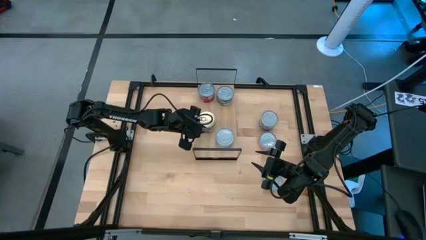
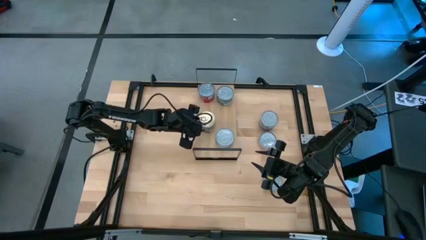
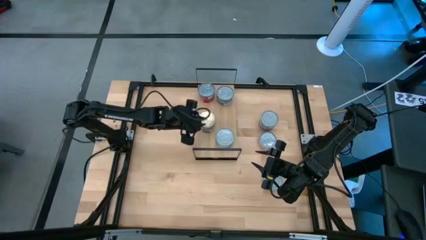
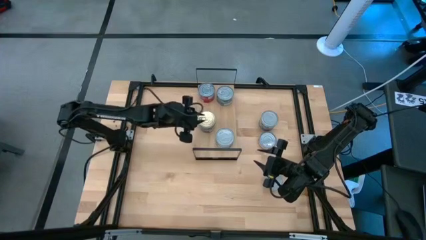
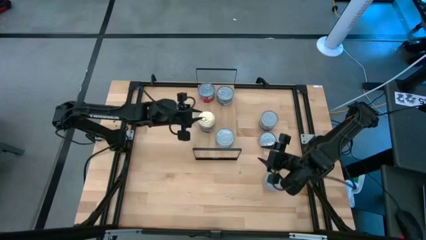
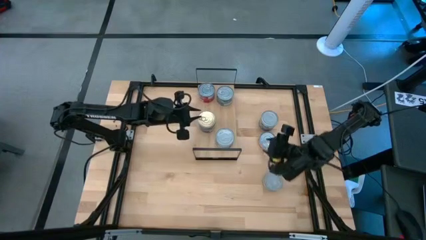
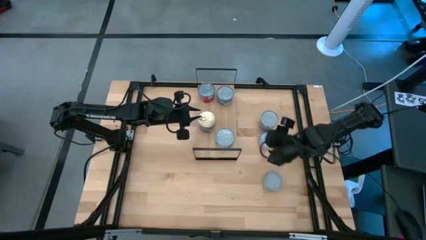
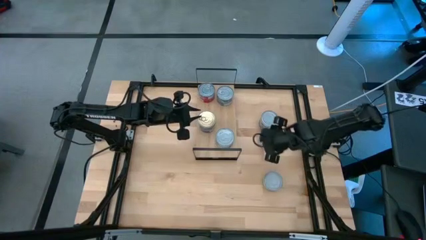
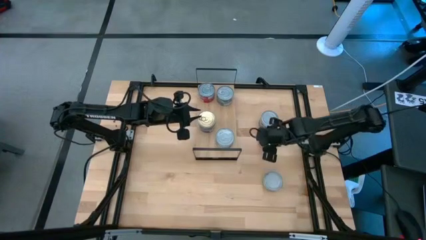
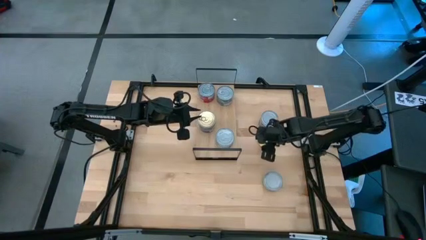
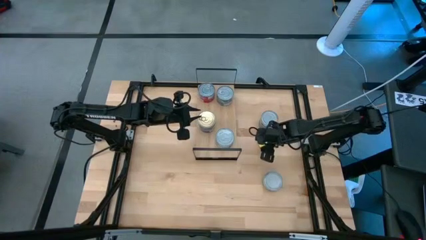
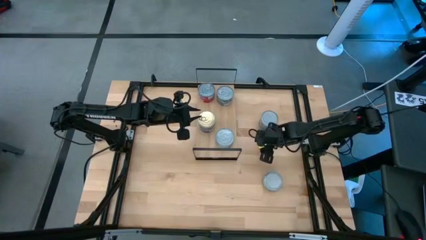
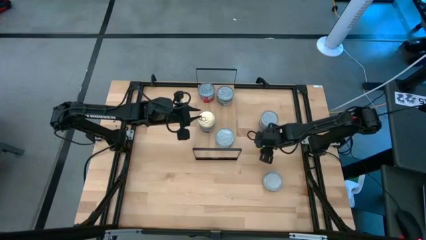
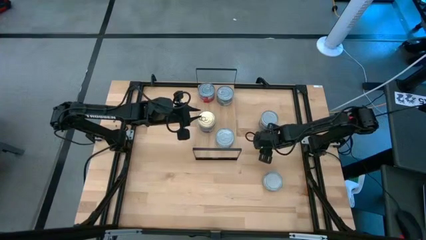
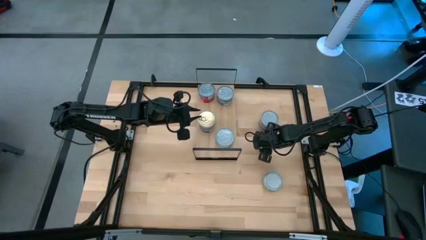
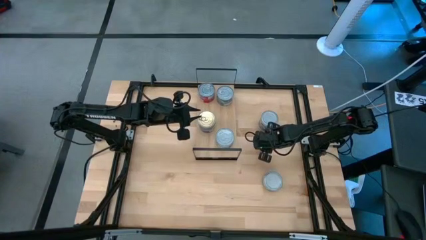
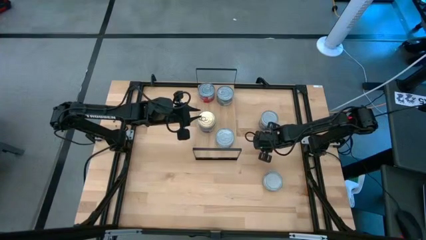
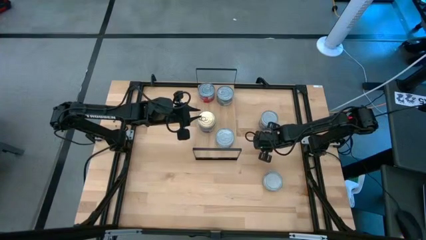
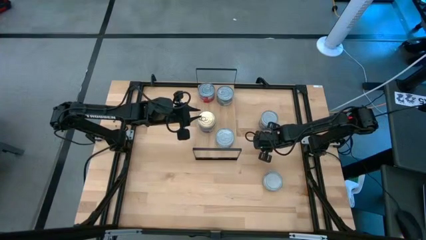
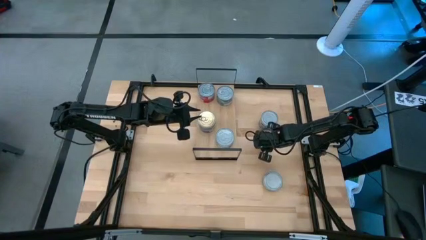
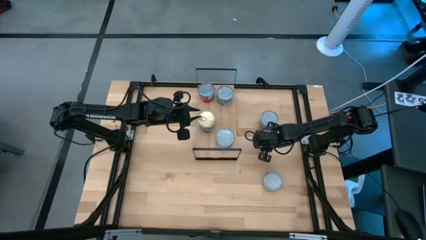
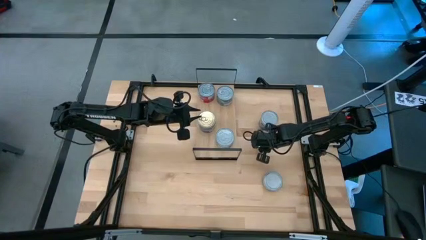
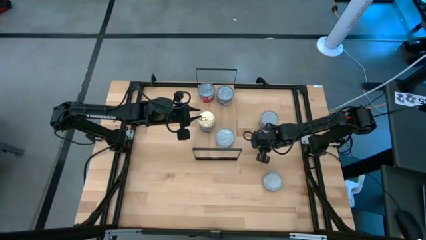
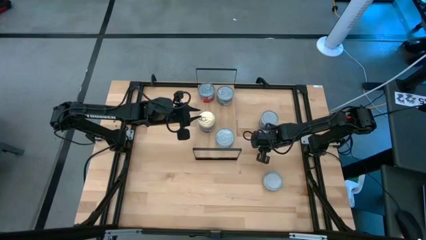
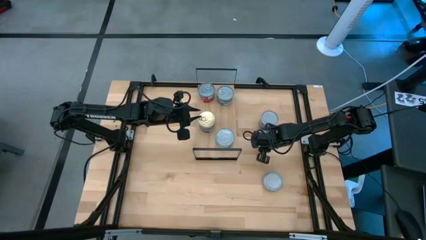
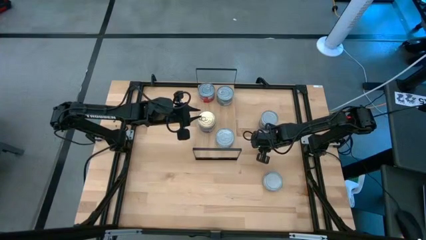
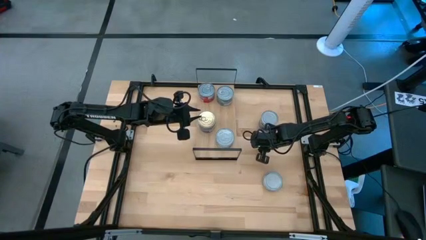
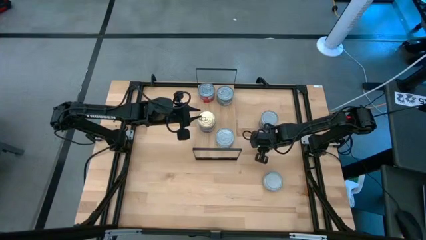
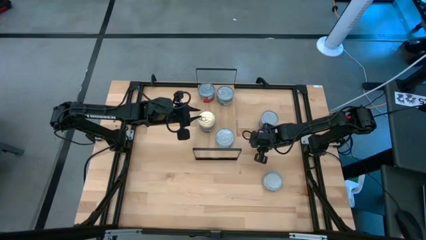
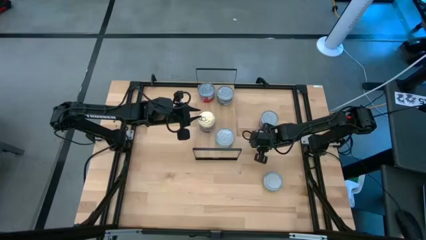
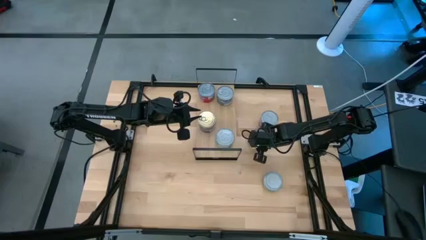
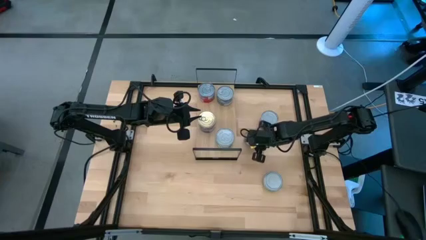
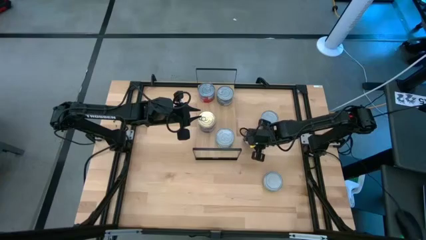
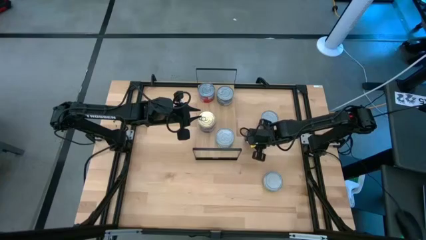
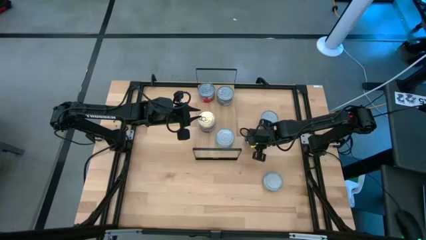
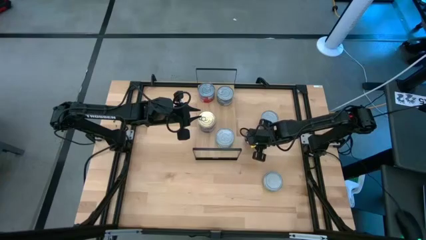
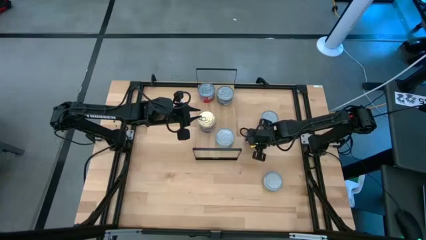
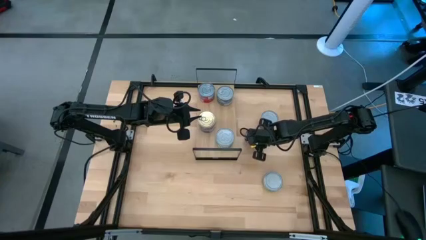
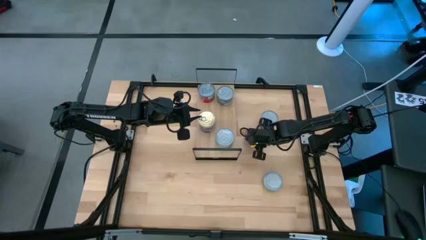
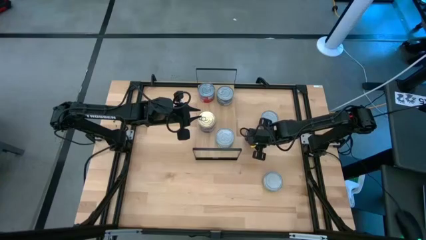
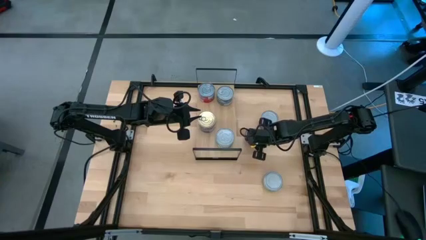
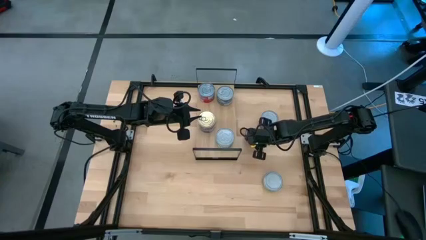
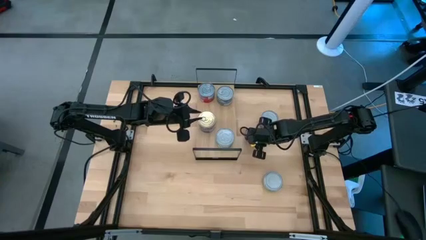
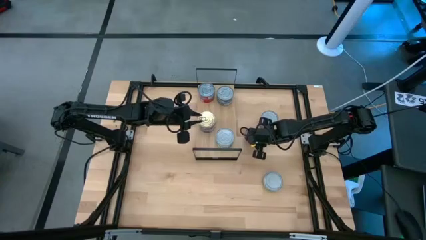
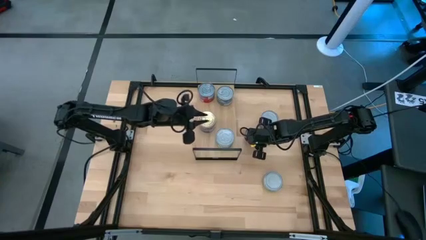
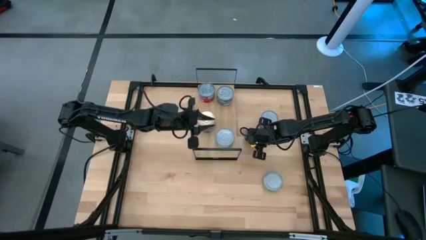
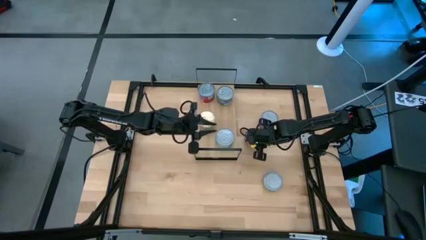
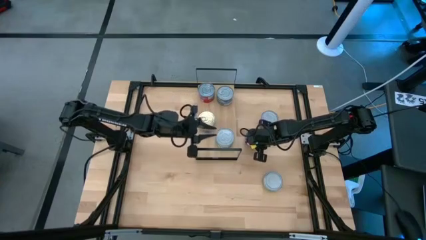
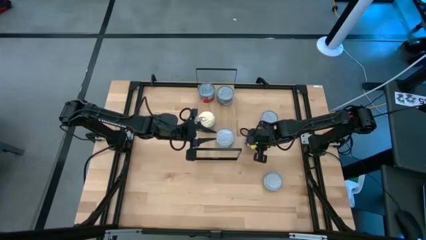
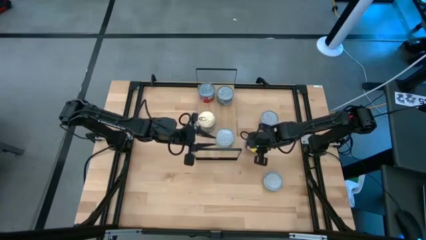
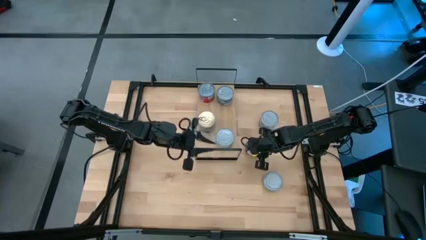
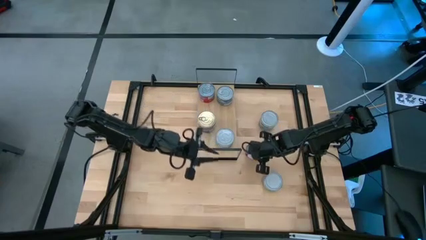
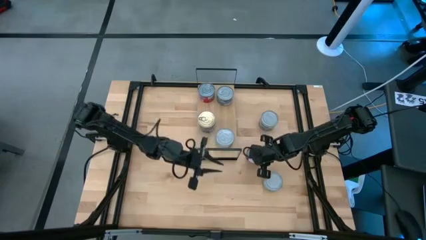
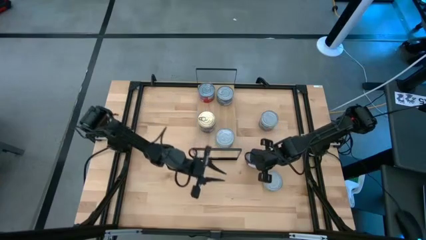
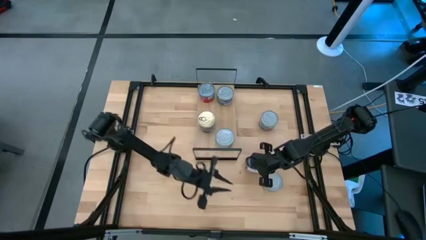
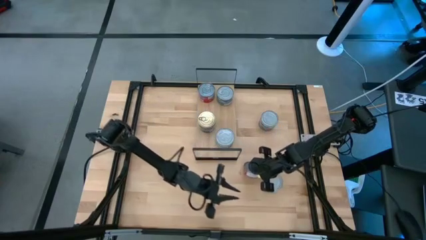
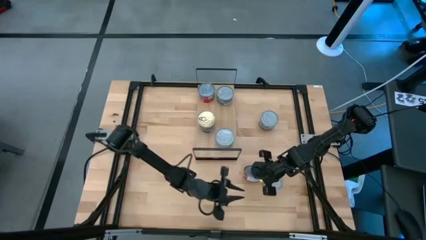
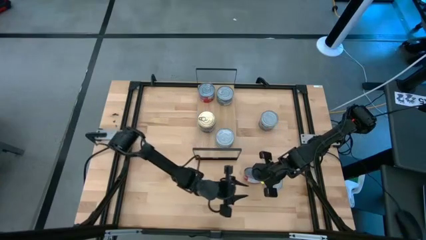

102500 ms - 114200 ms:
Task: Stack canned seafood by type on shelf
Stack the red tuna can on top of the other red tuna can on the shelf
